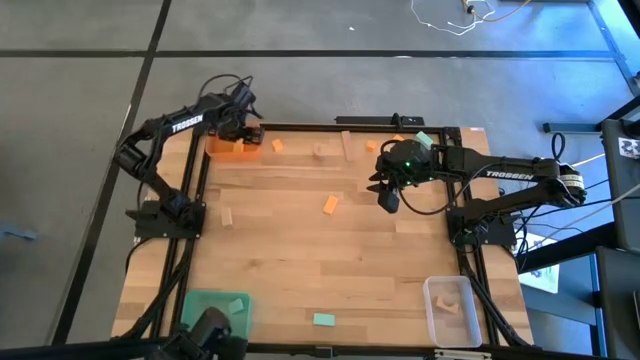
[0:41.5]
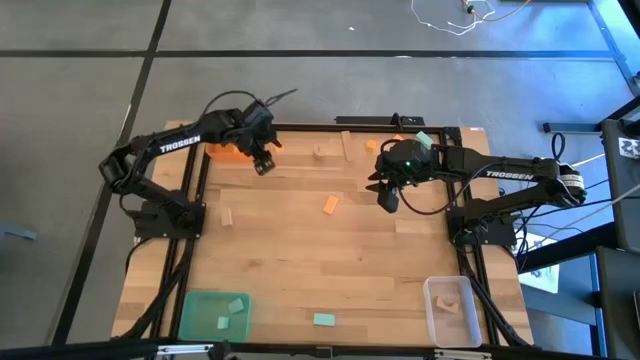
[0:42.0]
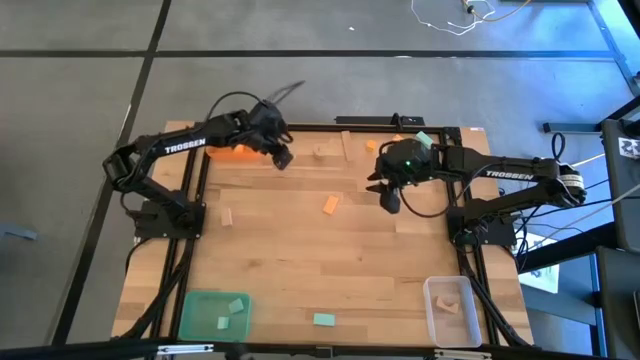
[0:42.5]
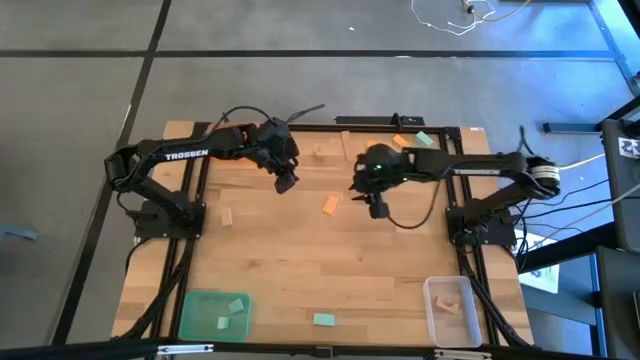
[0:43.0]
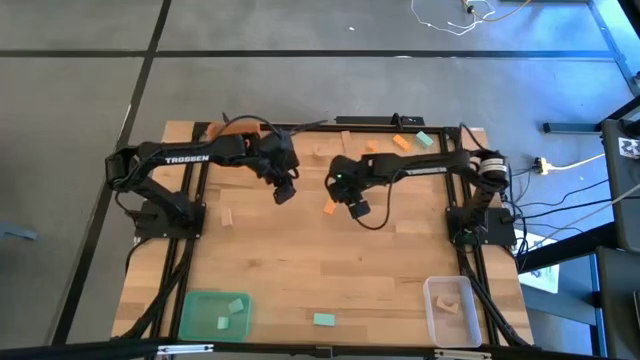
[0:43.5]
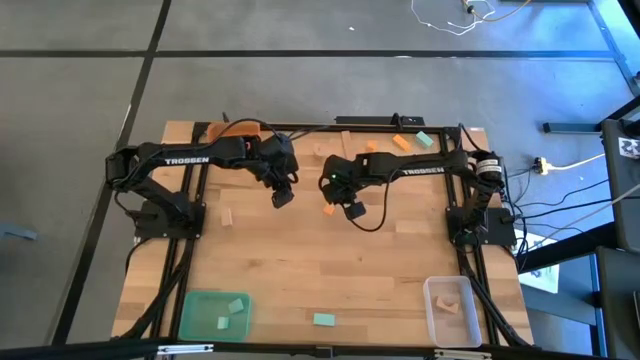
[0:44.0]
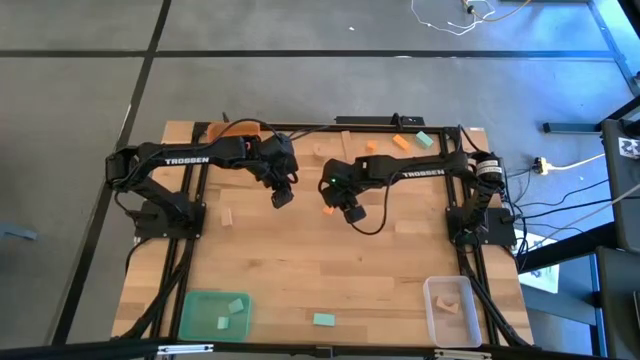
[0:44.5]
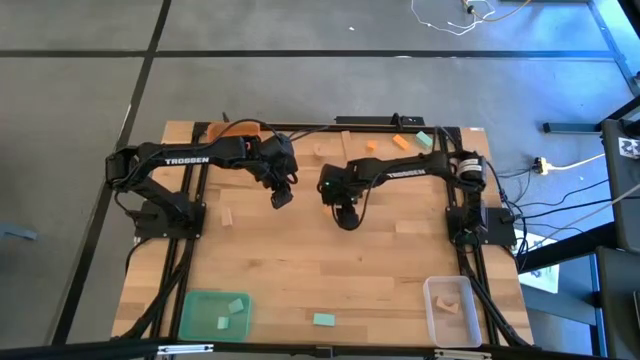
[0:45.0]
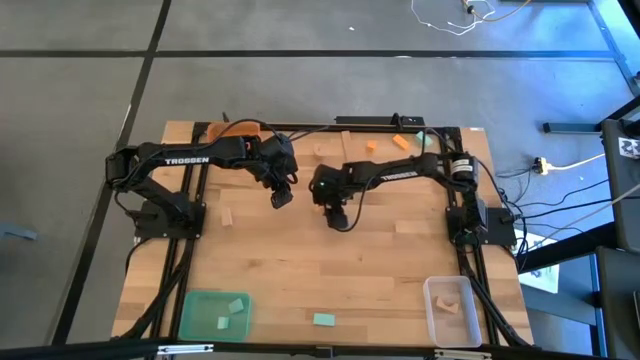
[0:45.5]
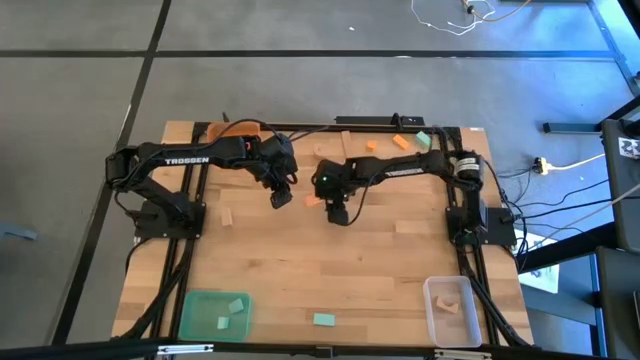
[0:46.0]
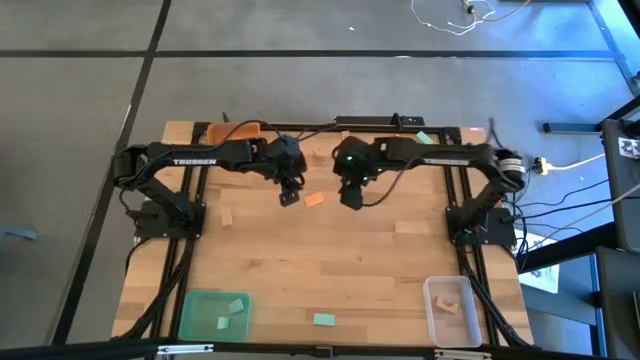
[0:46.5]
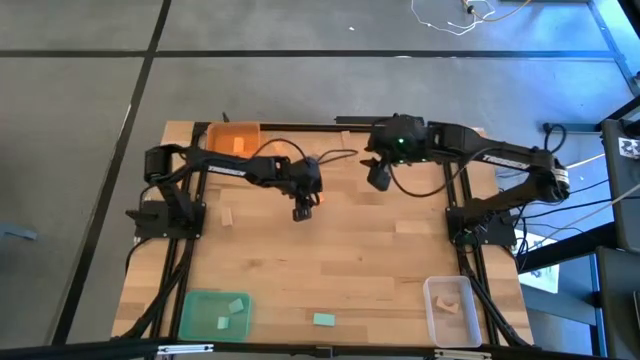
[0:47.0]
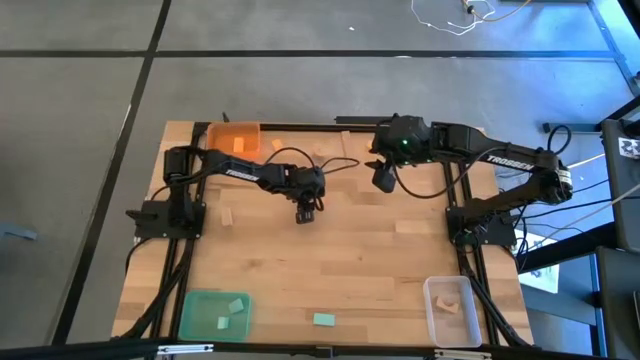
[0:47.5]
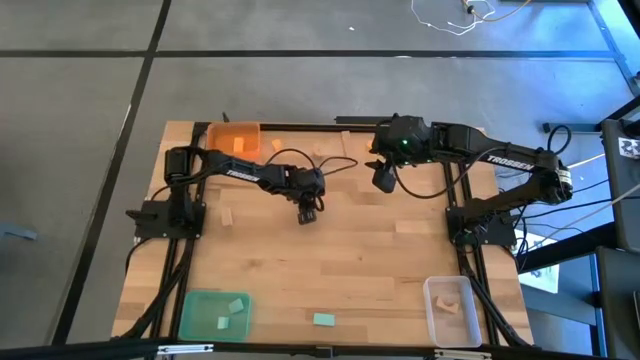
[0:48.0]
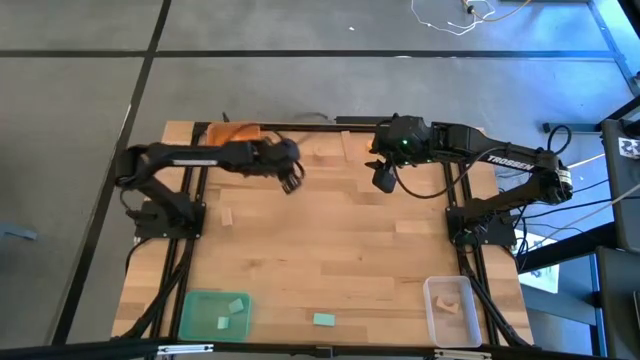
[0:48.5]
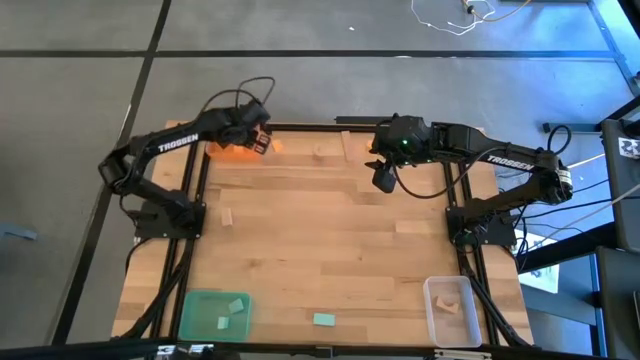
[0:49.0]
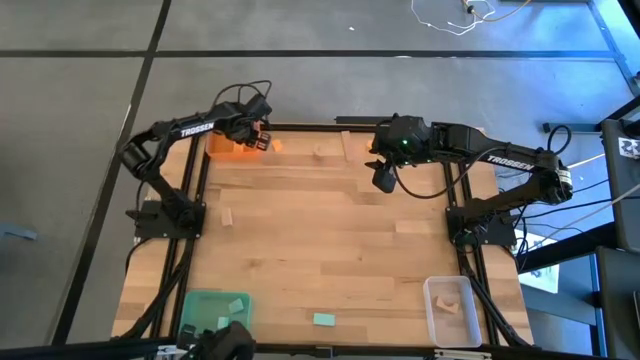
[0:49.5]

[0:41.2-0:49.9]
Task: Sort & place blocks by color
Put the orange block into the orange bin

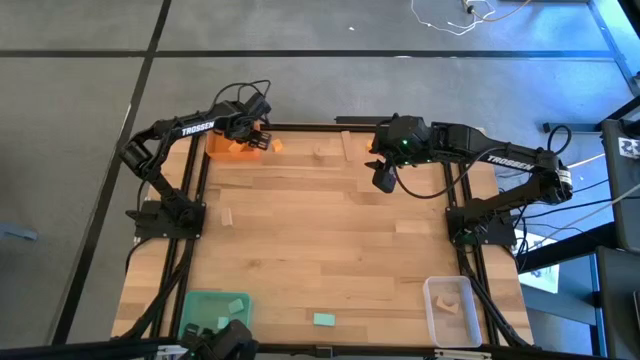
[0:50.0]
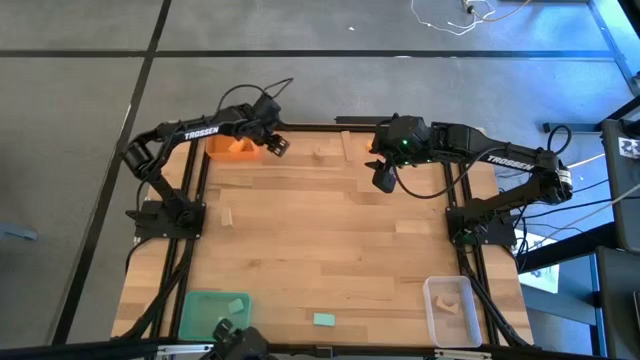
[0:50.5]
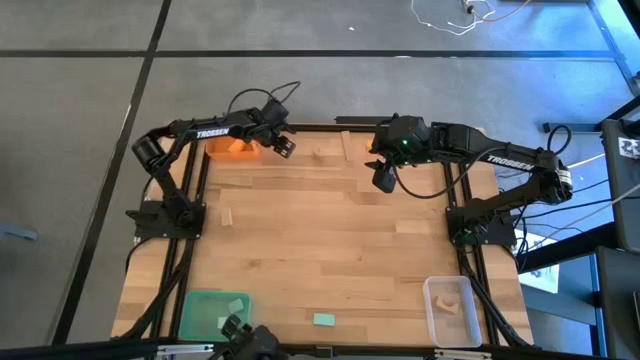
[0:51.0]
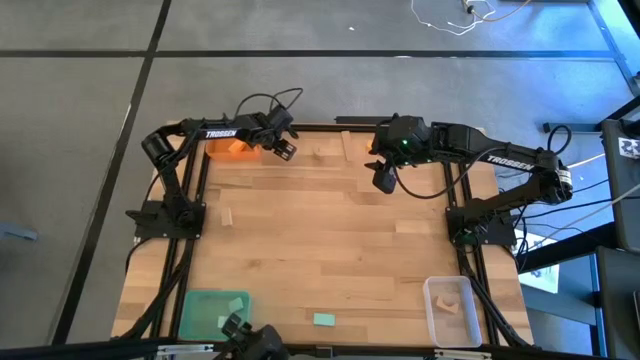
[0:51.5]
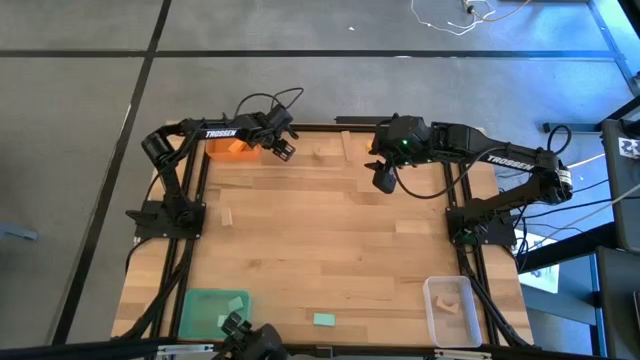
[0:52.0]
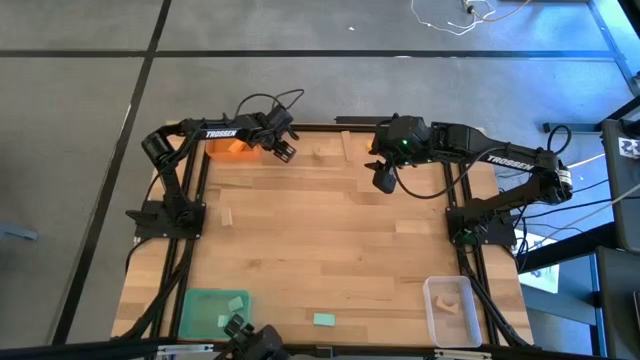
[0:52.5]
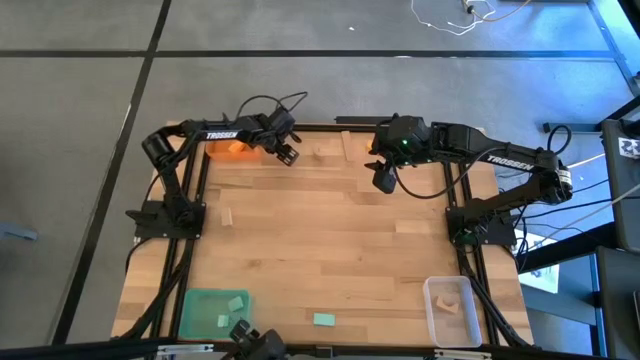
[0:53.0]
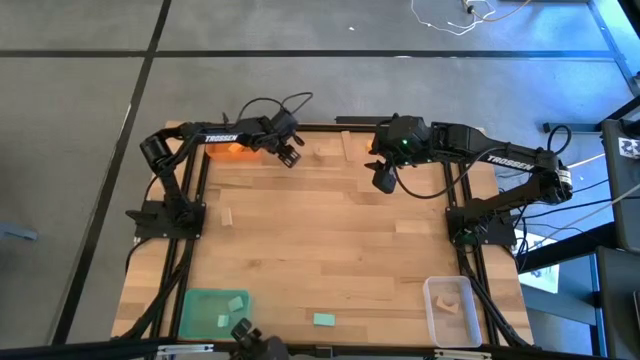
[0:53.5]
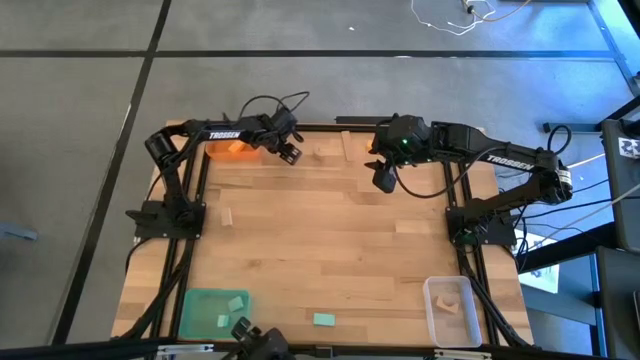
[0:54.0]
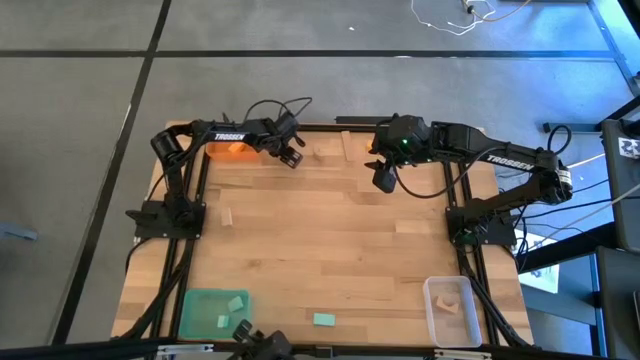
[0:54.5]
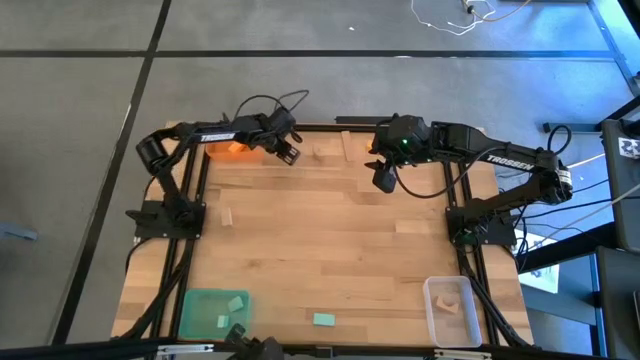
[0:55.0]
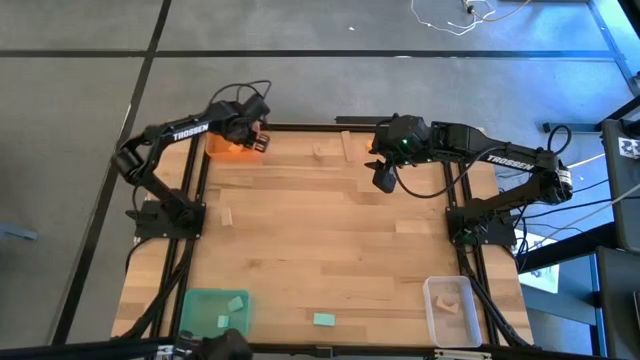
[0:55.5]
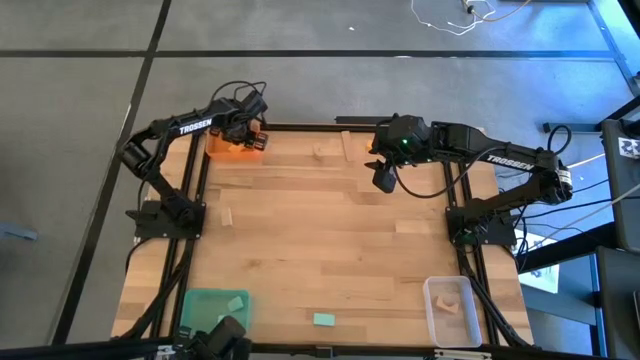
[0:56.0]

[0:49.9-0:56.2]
Put the orange block into the orange bin

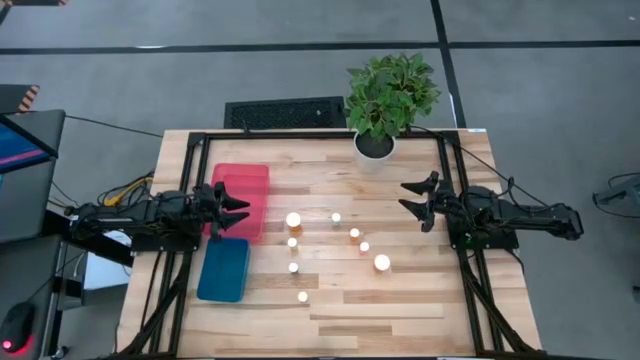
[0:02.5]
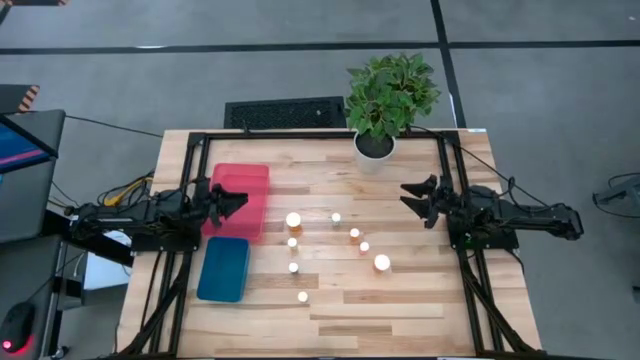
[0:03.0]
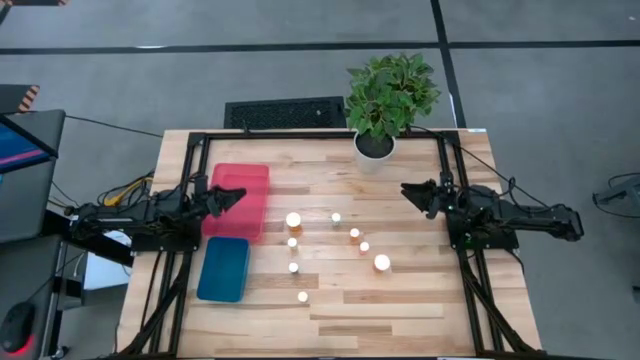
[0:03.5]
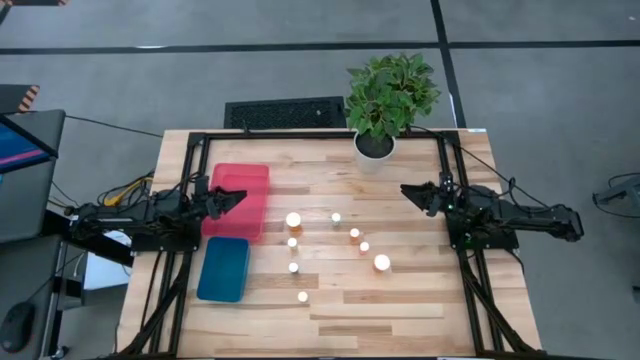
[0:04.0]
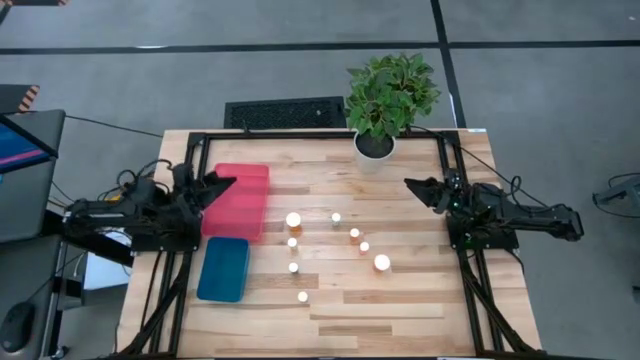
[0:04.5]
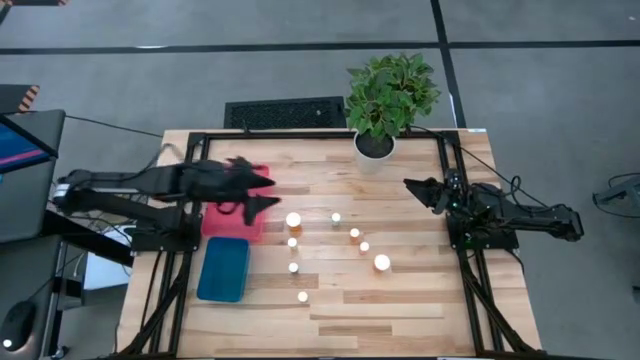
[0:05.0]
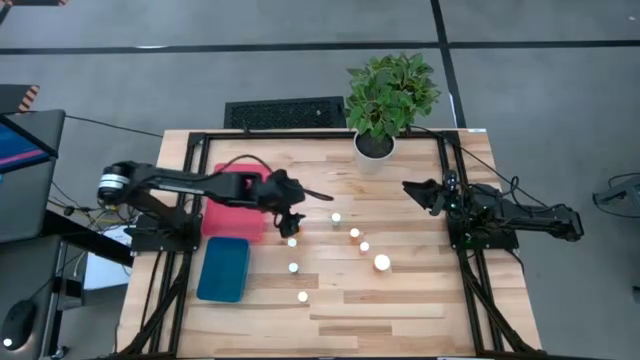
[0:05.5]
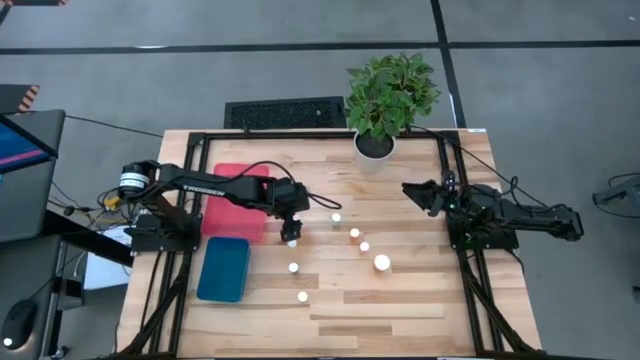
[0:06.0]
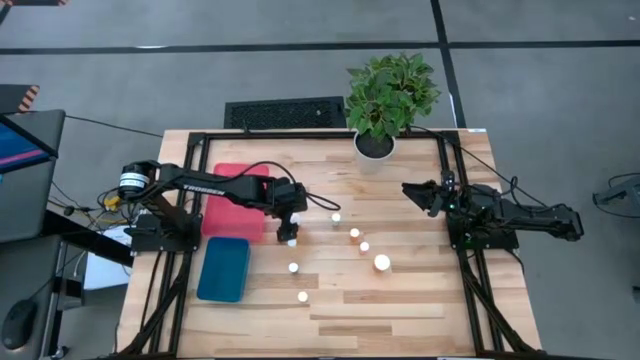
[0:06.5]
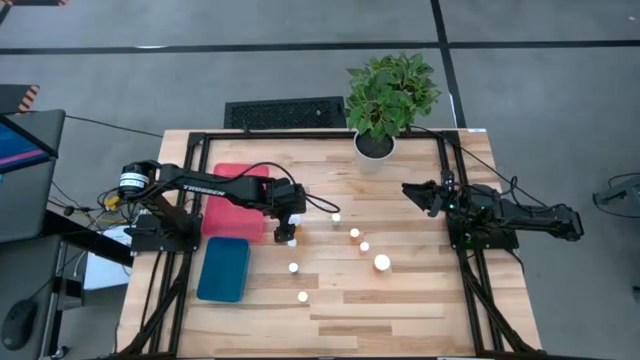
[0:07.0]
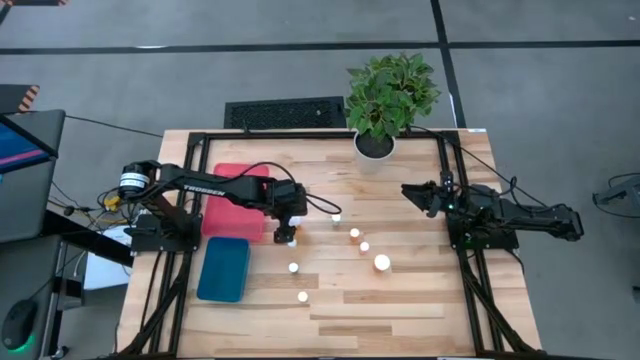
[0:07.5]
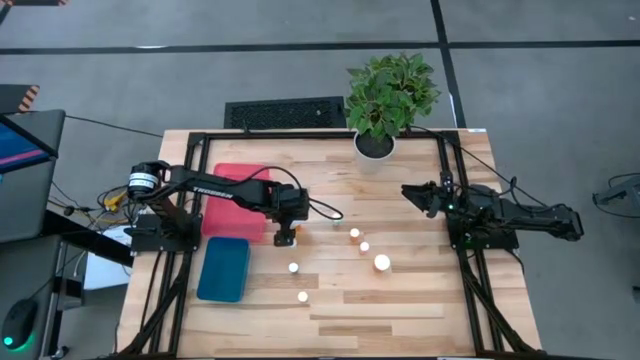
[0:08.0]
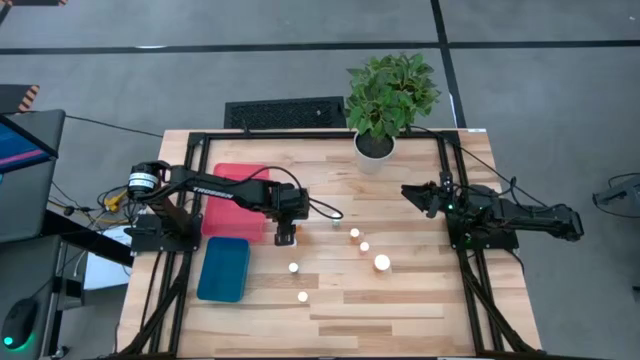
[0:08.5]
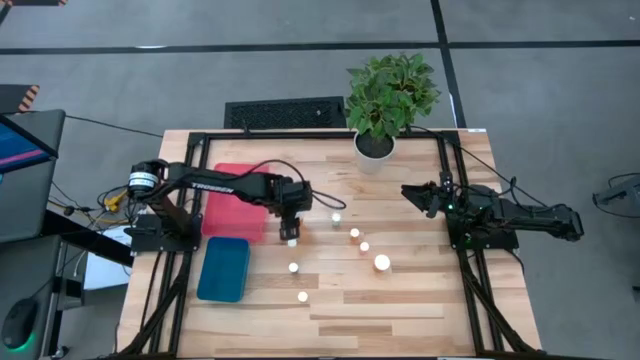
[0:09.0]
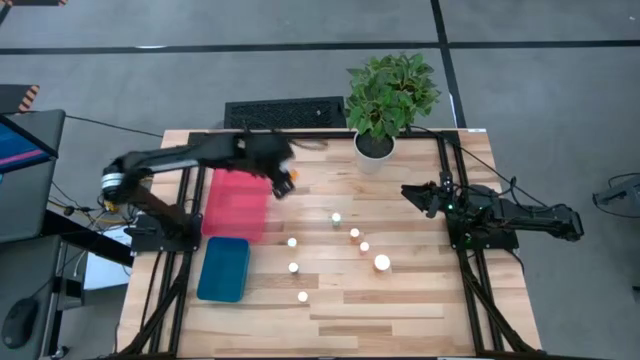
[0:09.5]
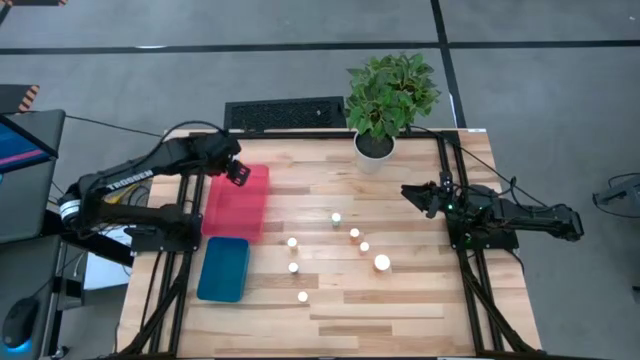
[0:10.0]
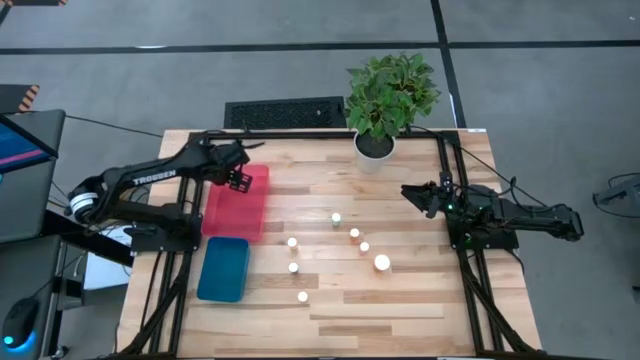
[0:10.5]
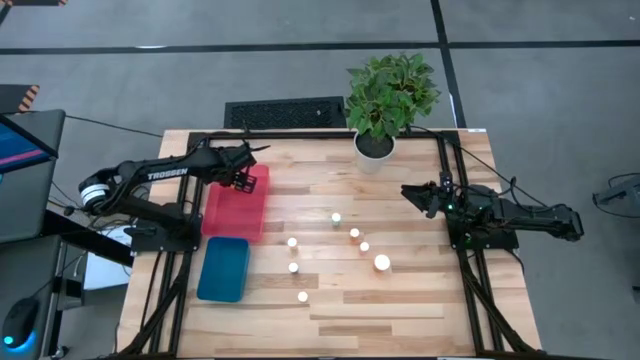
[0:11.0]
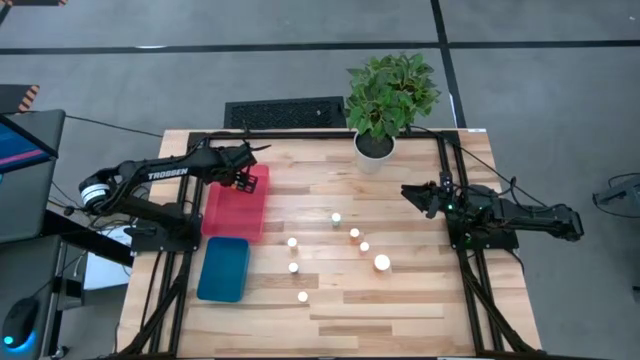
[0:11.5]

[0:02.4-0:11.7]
Task: Pick and place medicine bottles into bin by pill shape (circle, oval)
Put the top orange capsule bottle into the red bin
